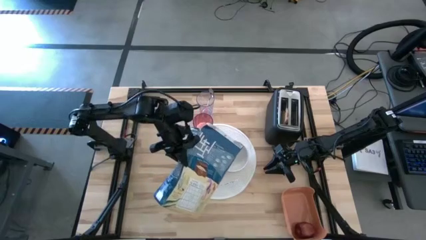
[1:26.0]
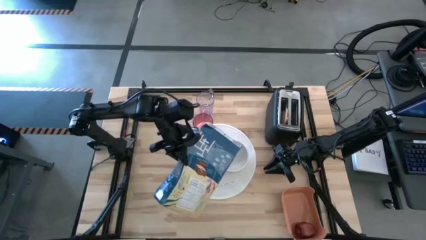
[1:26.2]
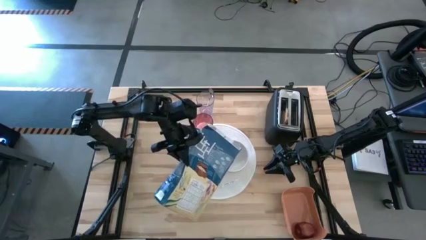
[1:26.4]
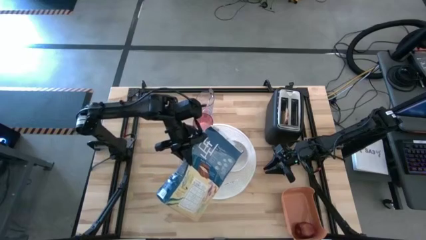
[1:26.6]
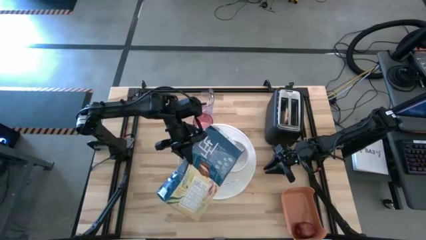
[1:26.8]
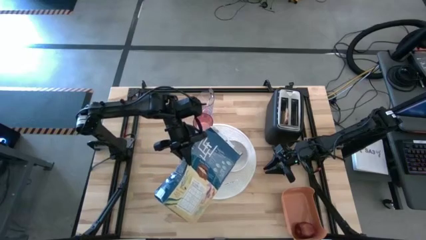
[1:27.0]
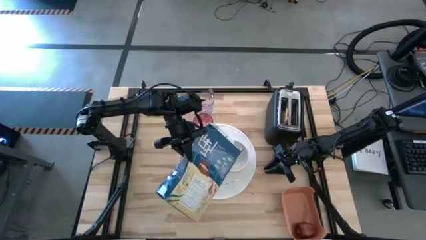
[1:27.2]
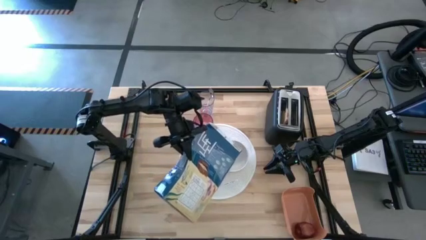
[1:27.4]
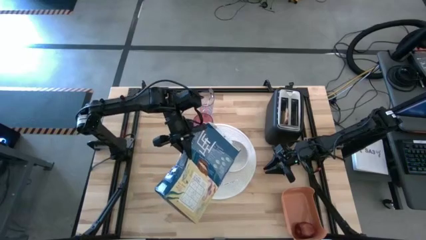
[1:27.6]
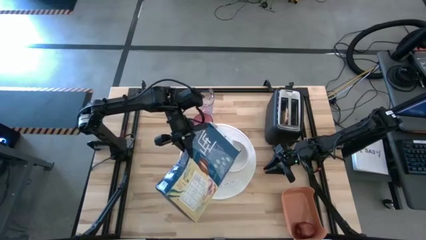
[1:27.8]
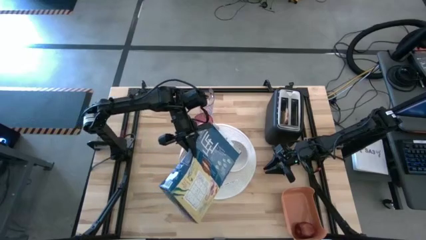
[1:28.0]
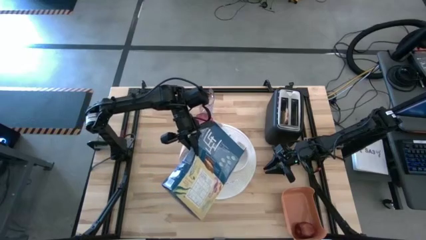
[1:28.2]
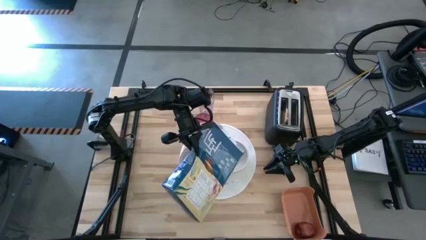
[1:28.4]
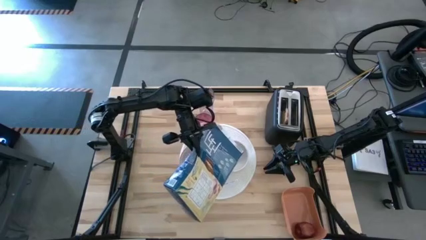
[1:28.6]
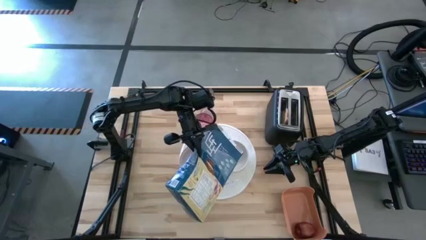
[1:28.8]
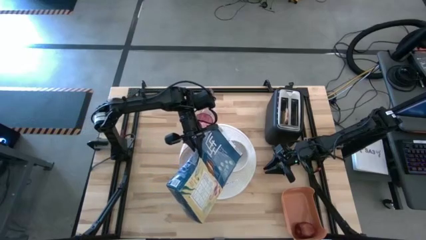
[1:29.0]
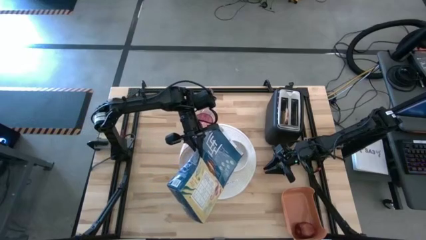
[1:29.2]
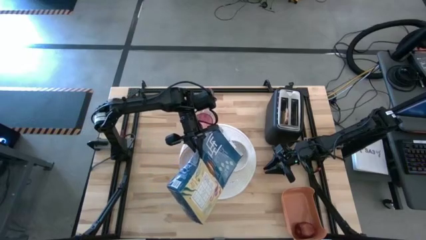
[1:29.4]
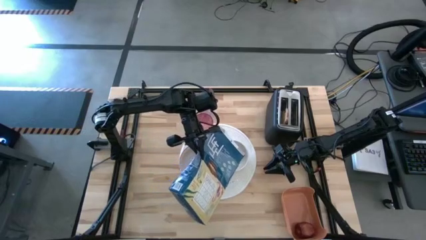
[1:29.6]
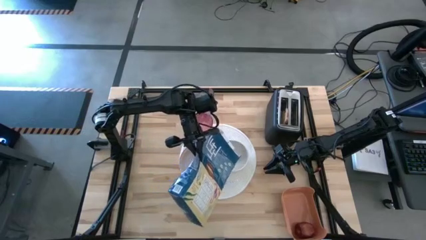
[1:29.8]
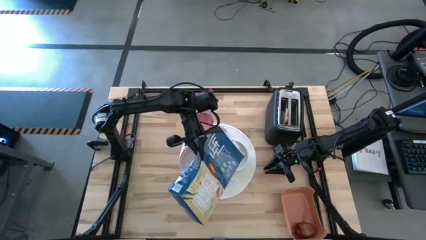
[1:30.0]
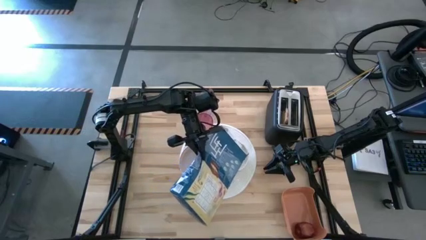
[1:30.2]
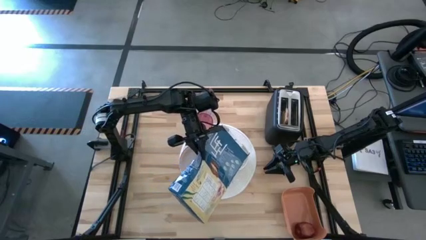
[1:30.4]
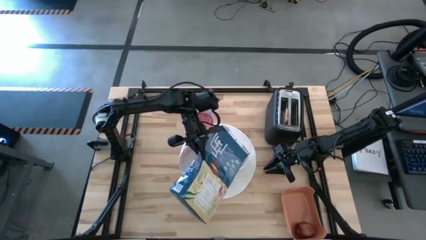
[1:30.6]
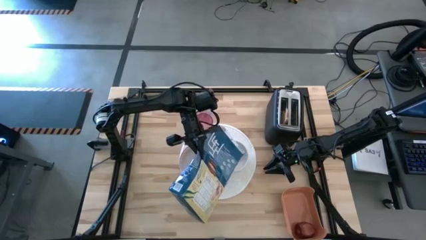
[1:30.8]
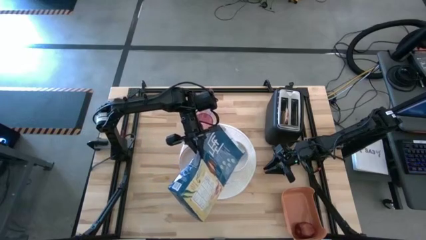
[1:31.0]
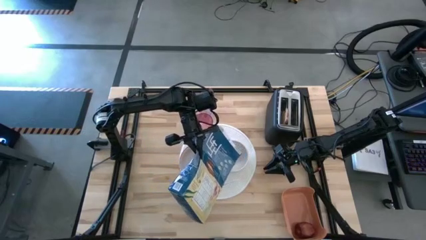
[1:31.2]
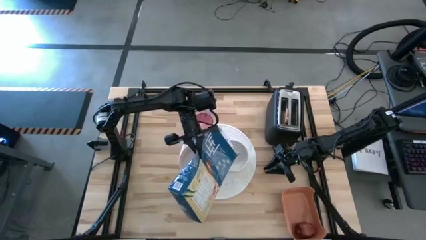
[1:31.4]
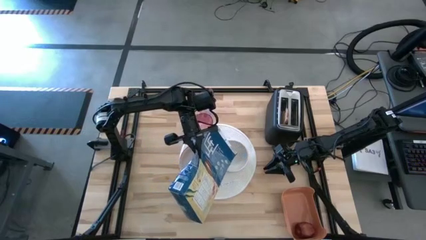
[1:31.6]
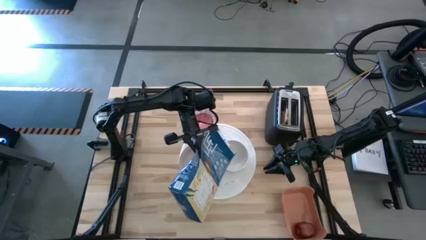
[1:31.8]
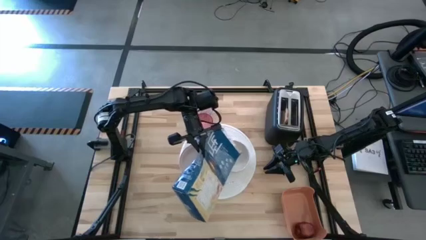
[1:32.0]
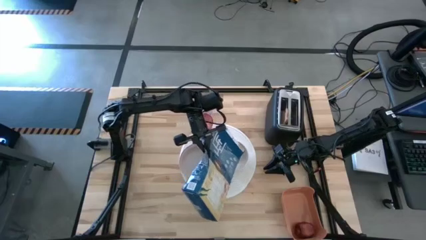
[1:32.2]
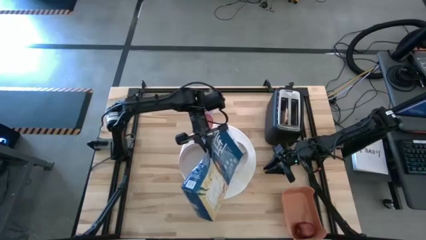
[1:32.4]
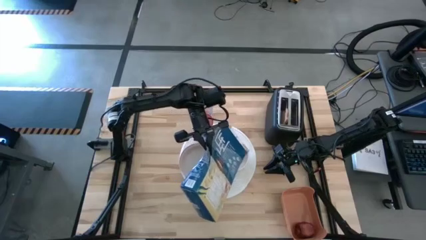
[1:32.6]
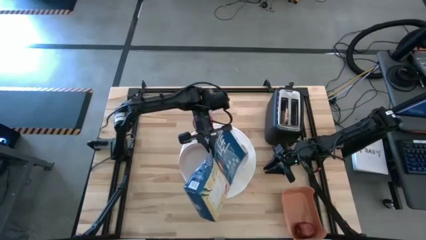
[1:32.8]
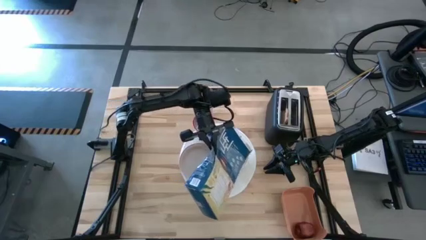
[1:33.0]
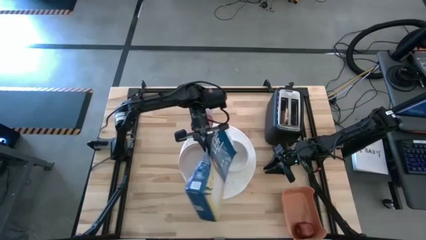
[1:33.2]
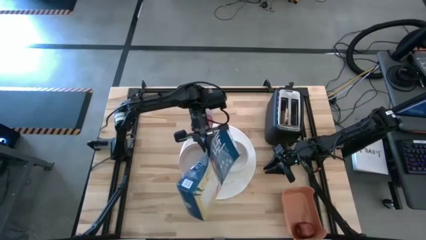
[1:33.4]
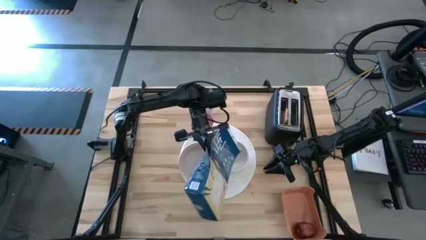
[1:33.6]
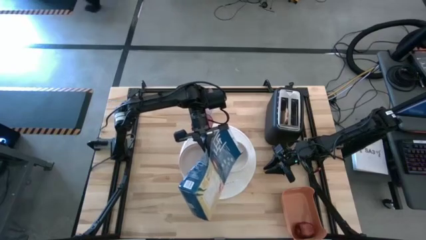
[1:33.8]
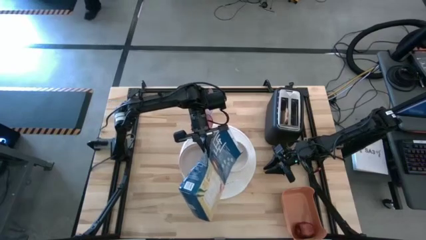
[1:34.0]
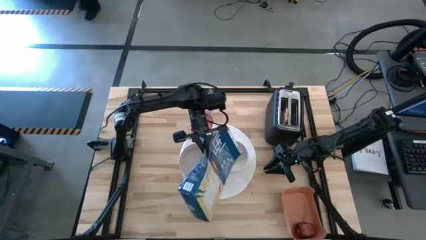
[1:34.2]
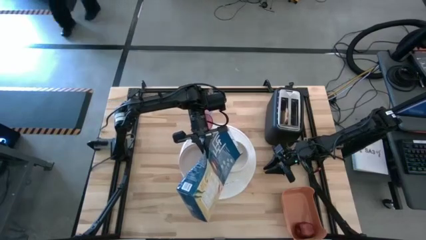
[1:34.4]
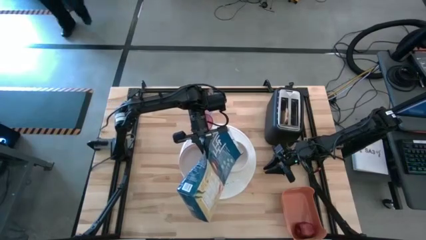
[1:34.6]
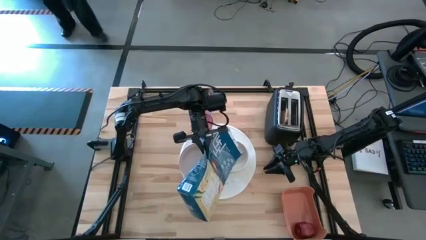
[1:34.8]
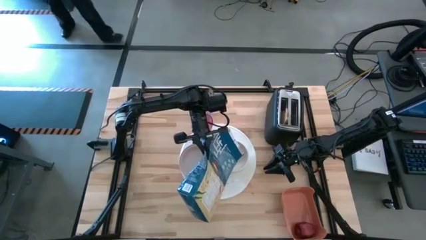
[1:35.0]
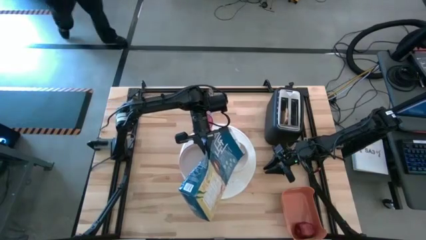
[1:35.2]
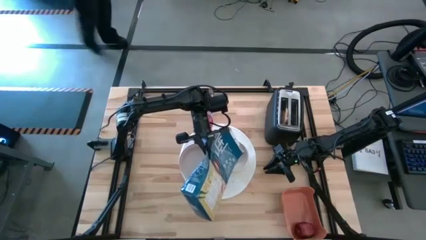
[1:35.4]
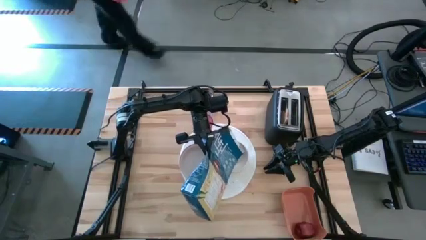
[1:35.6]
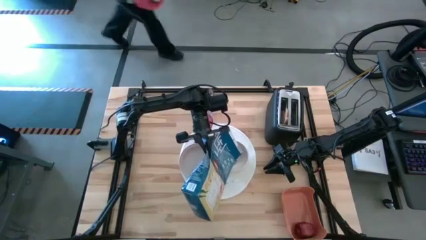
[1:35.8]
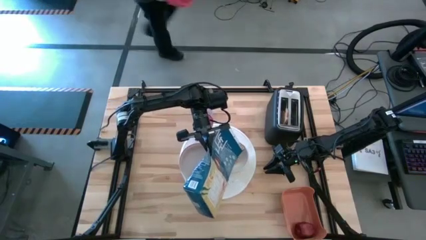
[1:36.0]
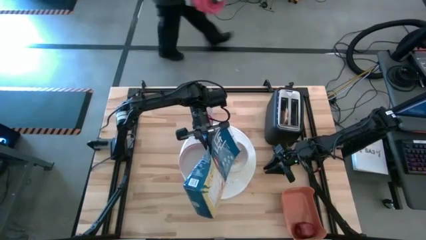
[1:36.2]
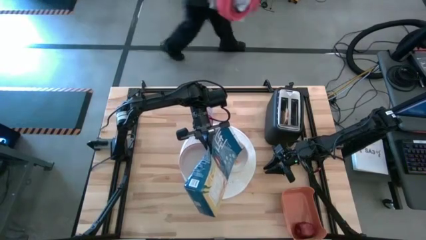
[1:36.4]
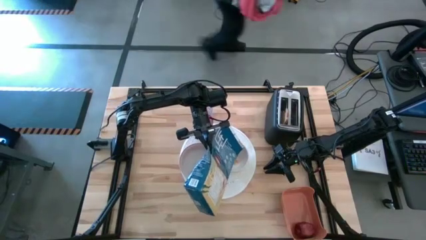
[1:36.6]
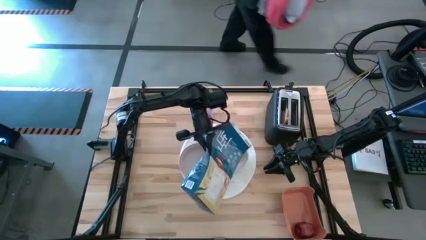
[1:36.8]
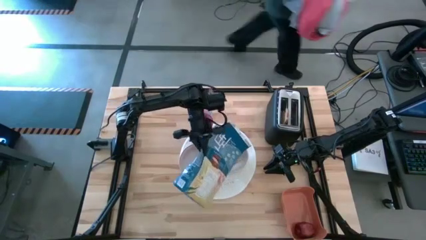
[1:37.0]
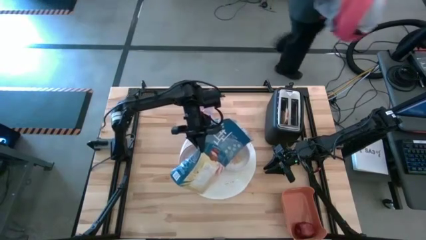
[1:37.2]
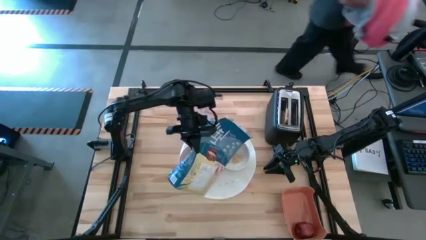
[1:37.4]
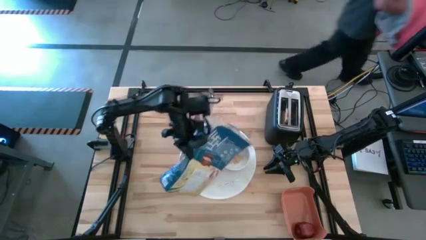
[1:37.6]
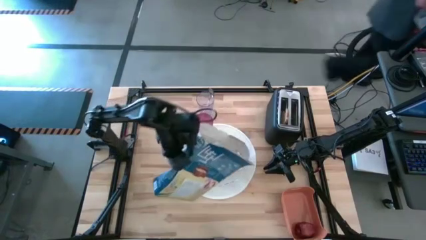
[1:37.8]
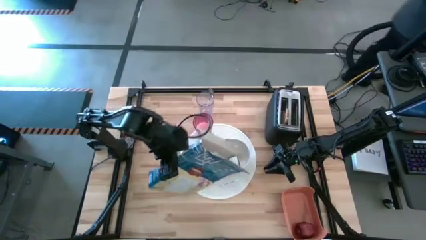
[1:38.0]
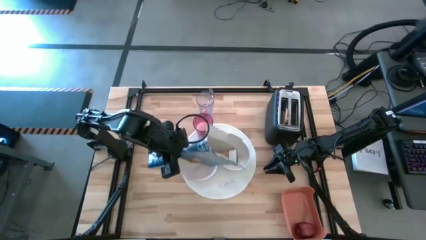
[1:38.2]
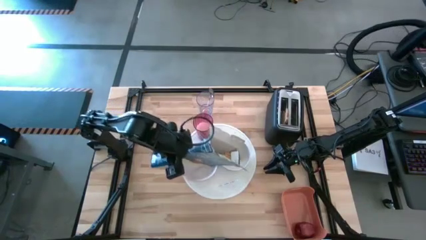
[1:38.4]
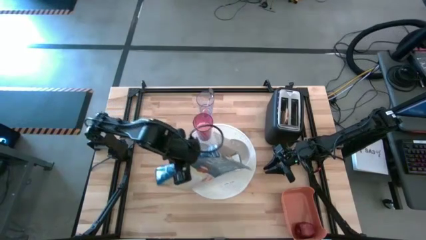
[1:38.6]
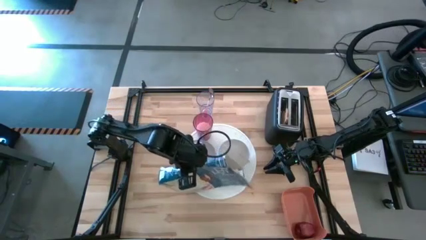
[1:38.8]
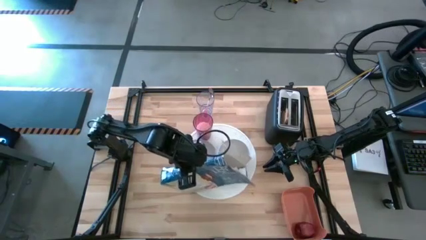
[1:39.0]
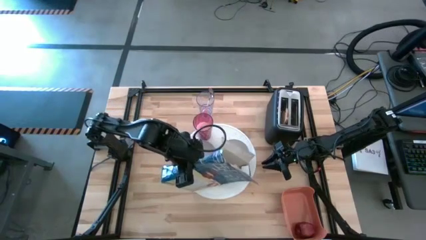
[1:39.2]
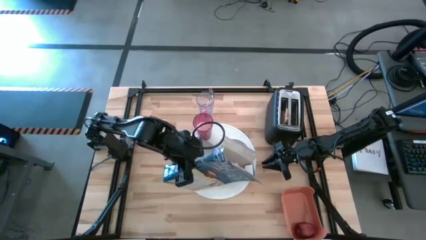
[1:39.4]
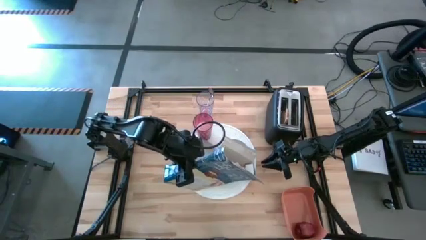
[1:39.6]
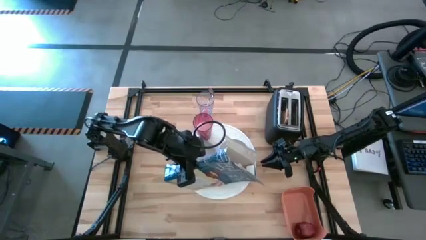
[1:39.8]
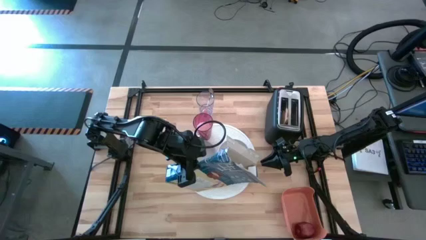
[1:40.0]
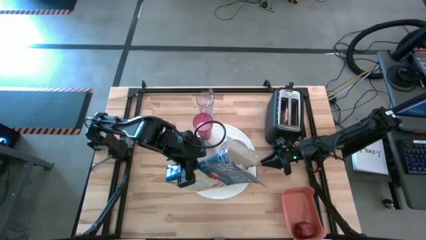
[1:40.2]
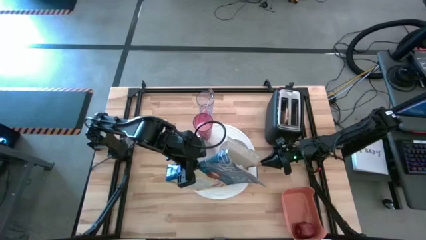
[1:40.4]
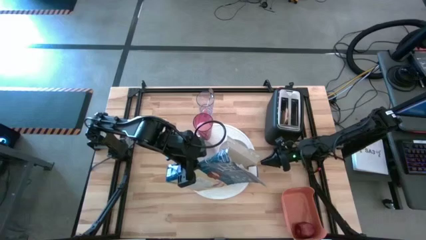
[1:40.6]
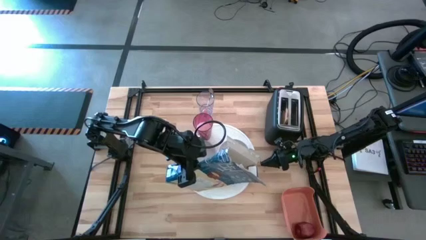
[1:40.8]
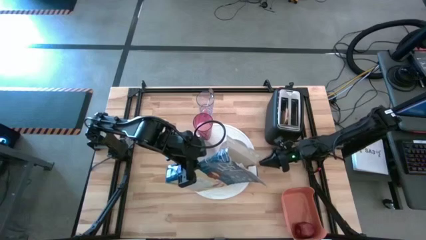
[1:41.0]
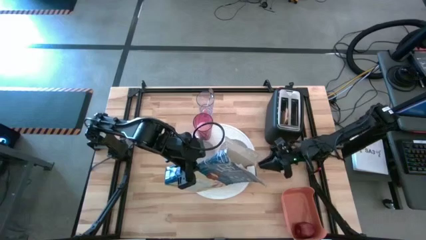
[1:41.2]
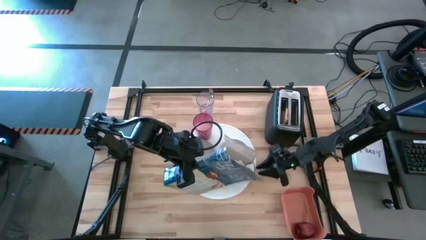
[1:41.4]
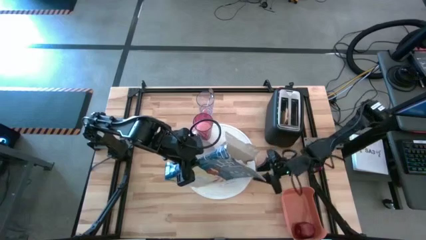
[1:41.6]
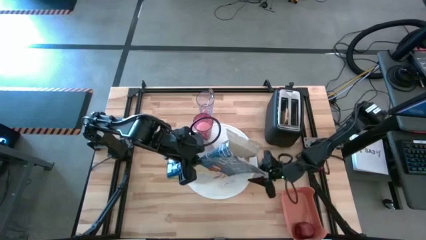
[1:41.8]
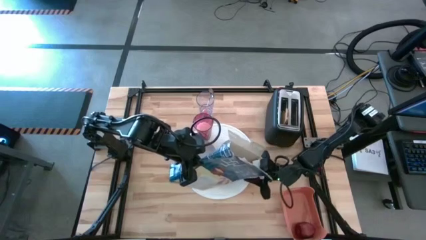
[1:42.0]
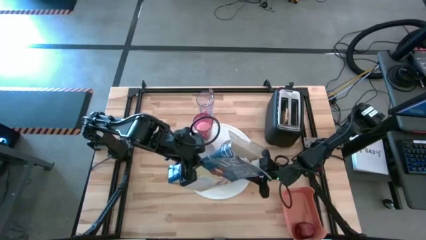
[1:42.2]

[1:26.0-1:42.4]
Task: Arrange a breakfast setting
Pour the cereal from the cereal box into the white bowl
